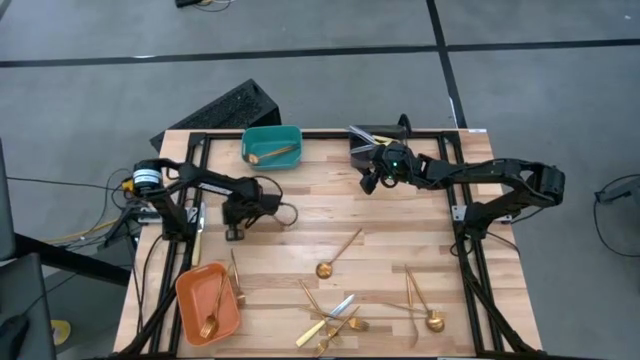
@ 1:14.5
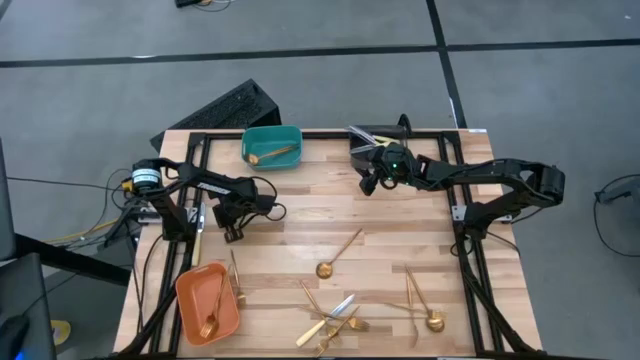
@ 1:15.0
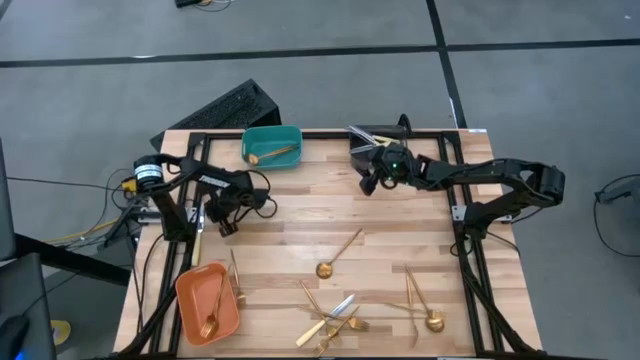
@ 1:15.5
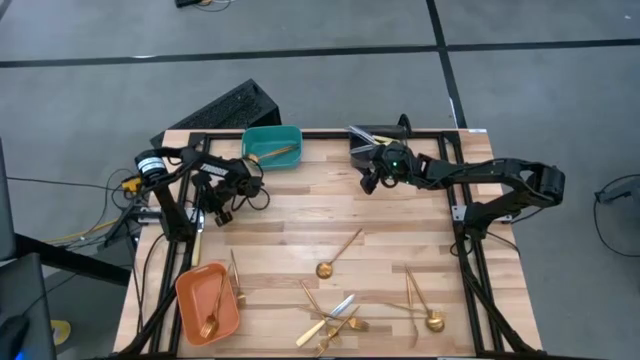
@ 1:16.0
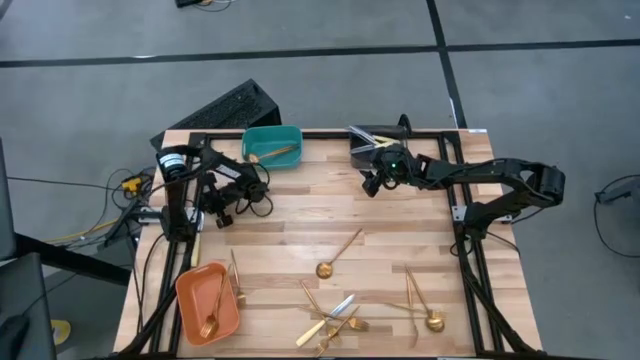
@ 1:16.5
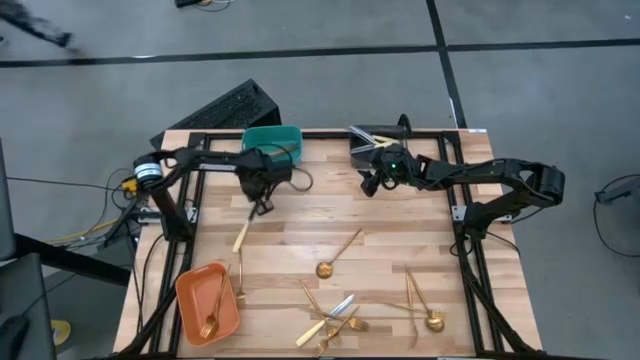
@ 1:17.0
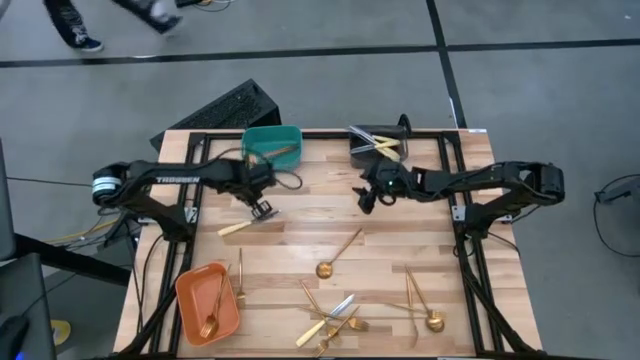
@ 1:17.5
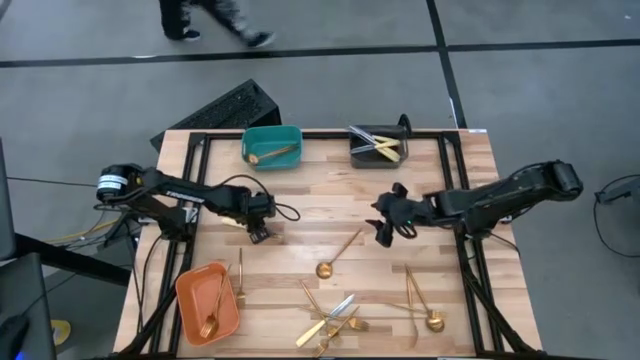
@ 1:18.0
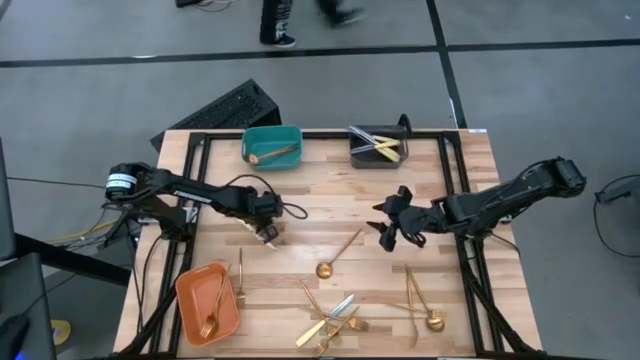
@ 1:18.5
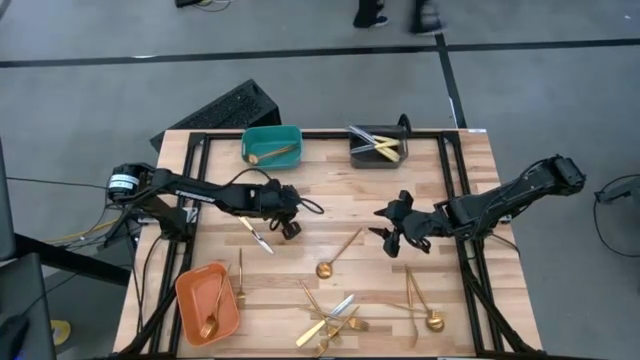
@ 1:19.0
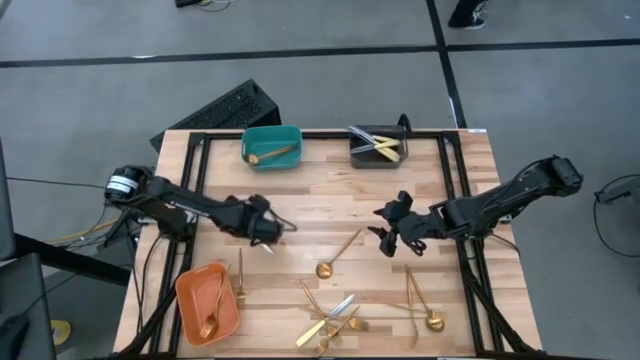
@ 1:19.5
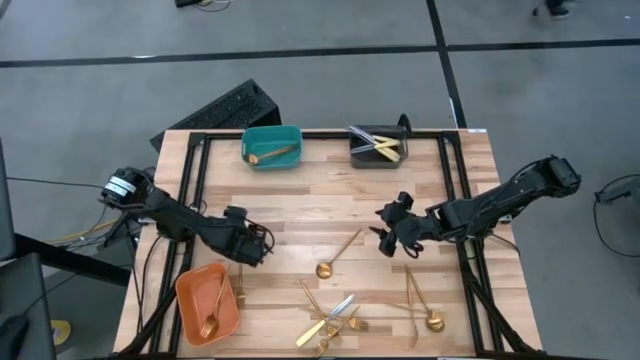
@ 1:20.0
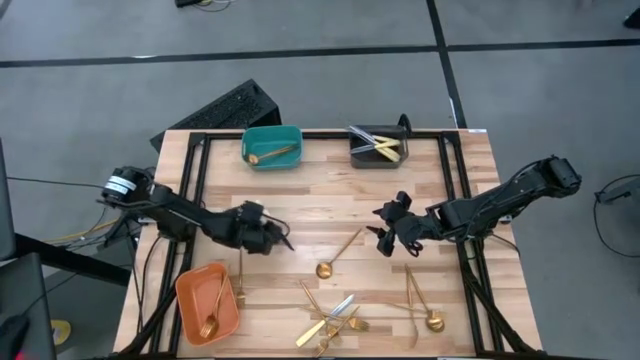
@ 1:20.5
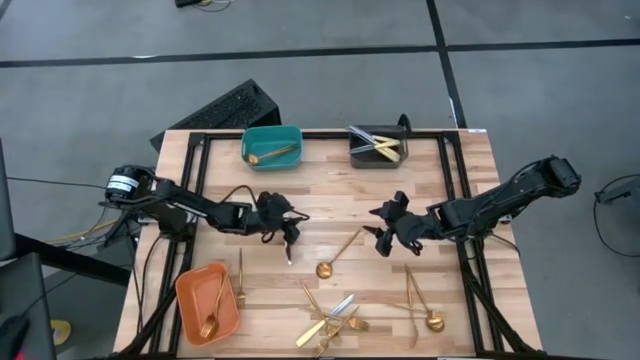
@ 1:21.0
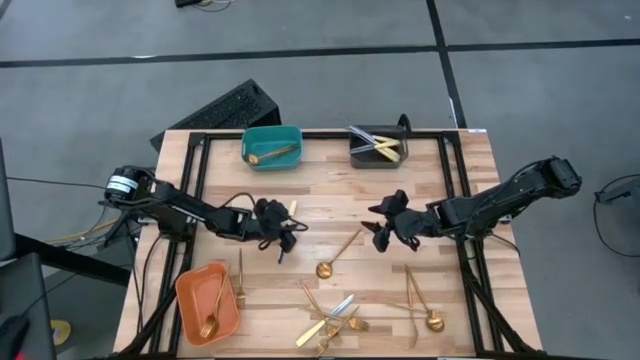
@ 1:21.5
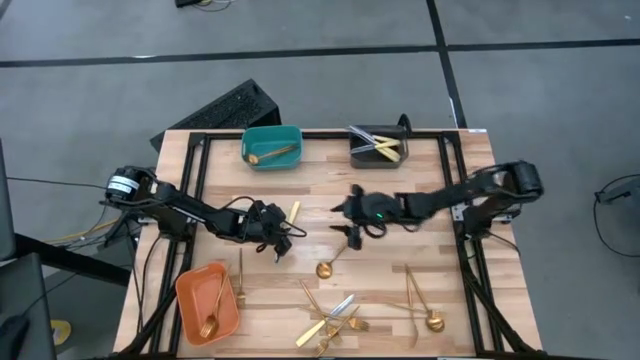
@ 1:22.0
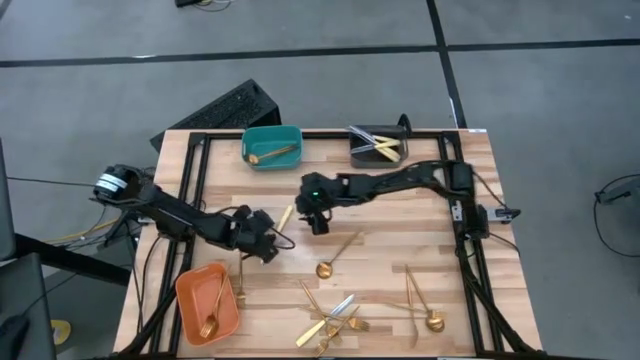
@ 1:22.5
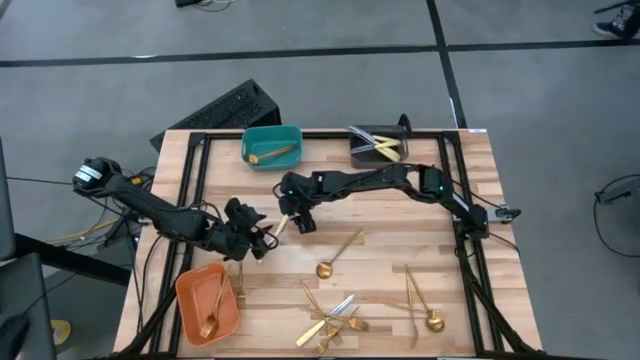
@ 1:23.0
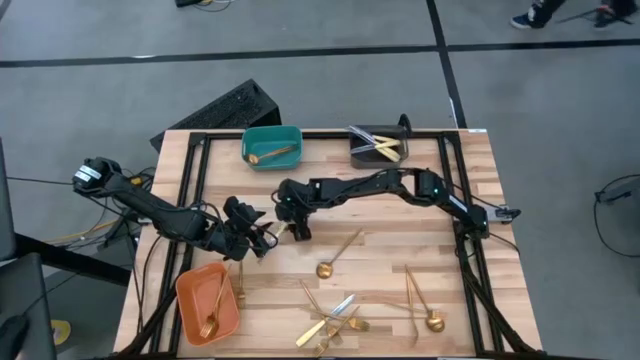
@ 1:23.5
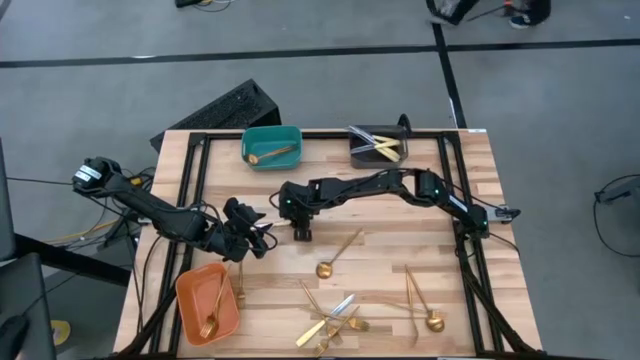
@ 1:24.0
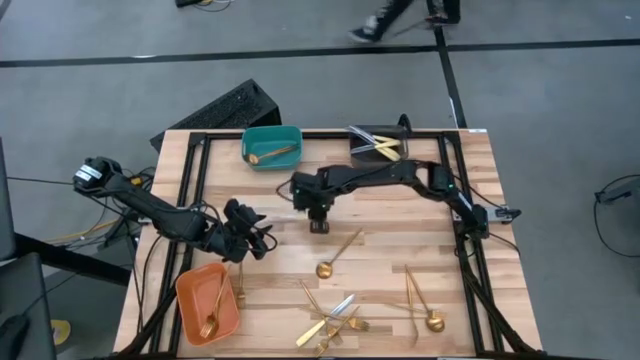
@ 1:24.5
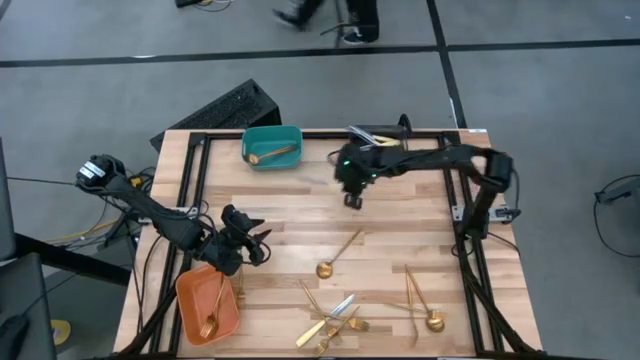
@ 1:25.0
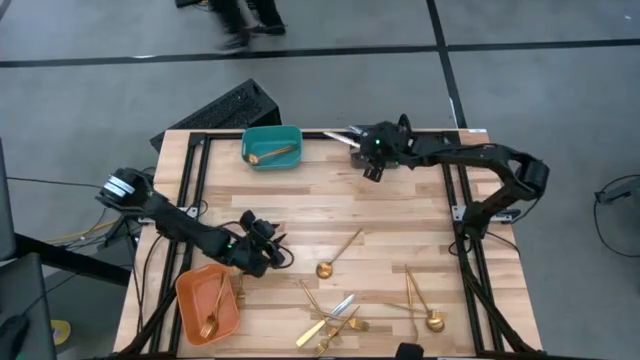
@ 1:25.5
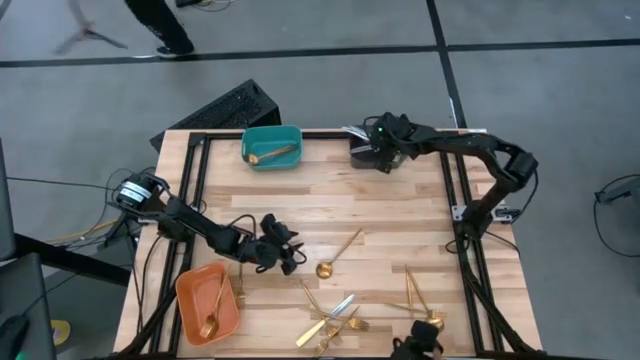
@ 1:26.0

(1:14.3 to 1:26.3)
Task: Sort silverware by color (type)
Put the yellow knife into the black bin

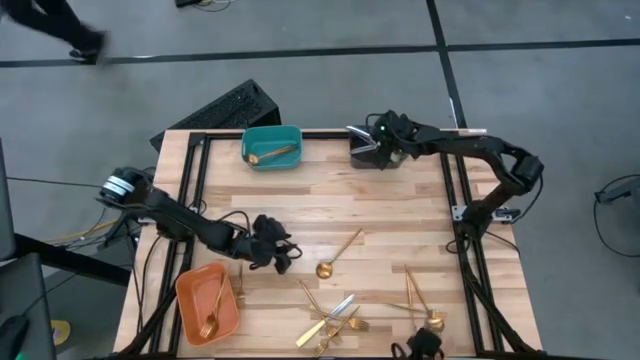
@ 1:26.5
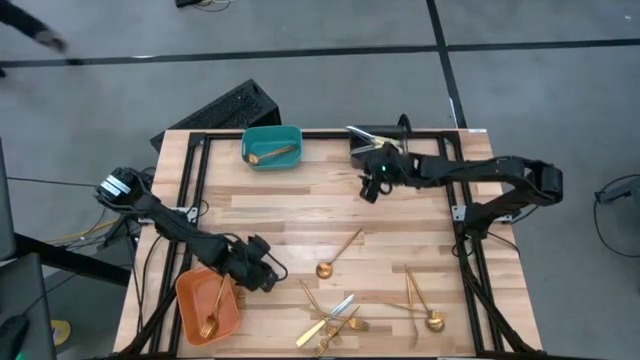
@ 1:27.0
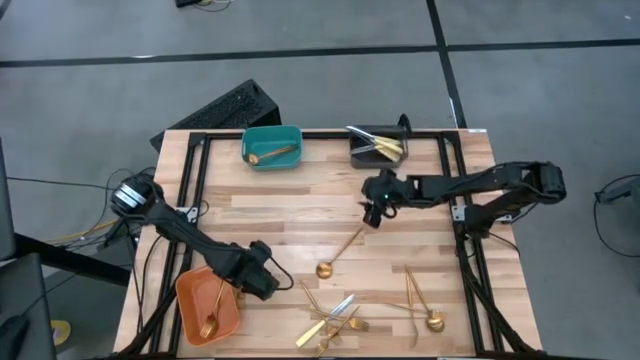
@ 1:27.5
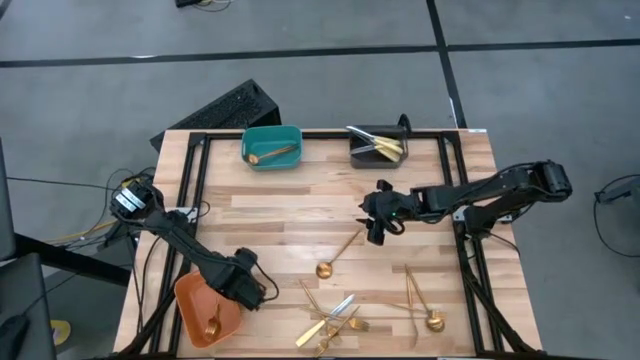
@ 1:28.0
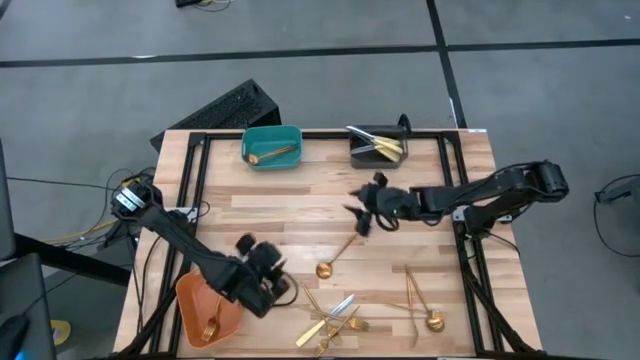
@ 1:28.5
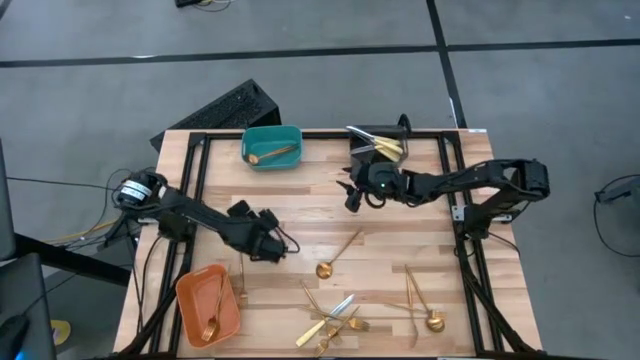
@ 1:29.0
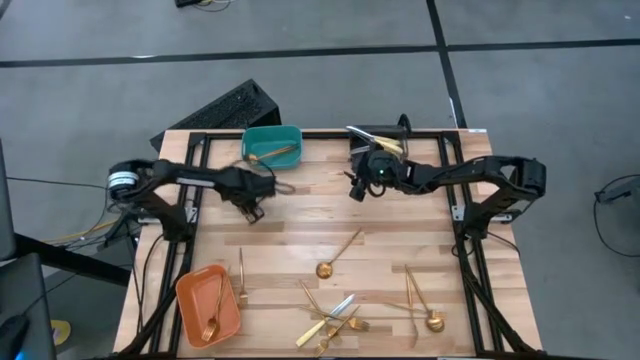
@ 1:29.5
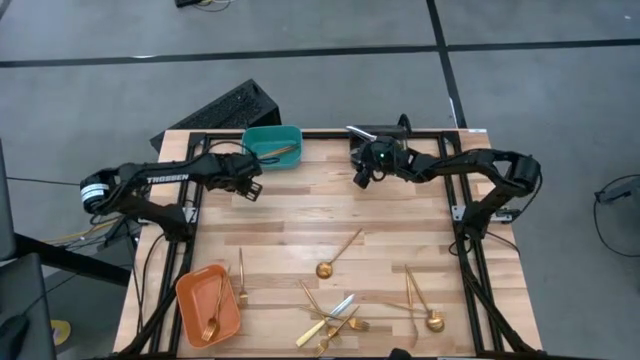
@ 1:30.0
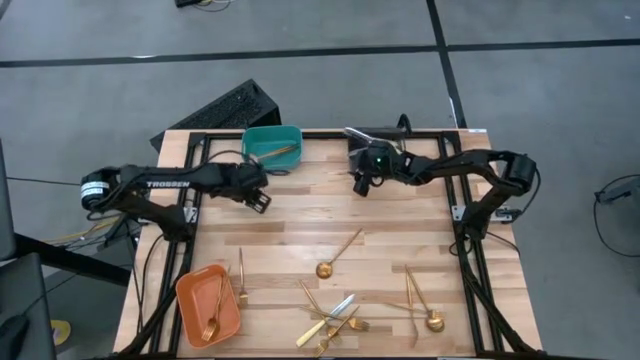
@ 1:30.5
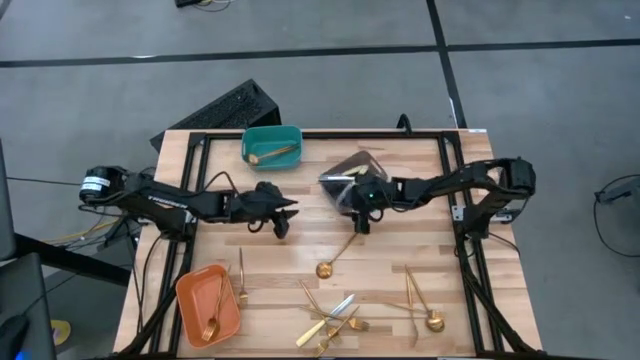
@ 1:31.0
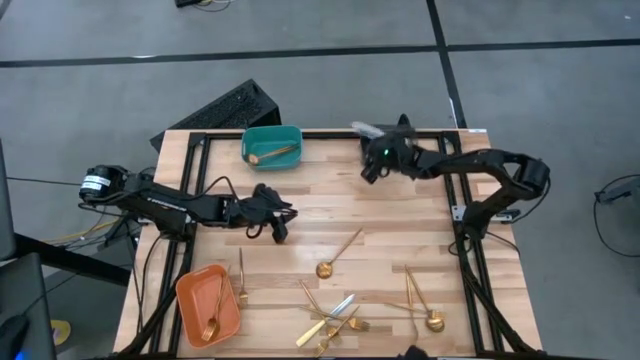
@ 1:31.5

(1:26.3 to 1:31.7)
Adjust the black bin

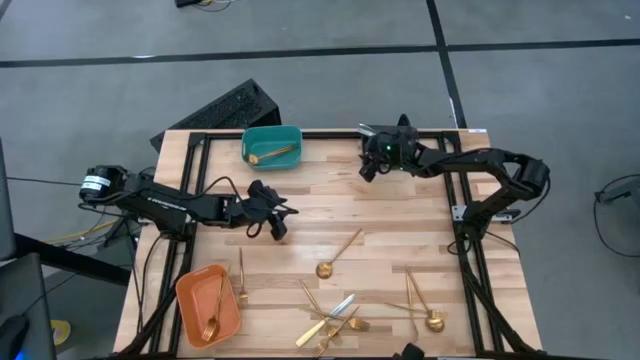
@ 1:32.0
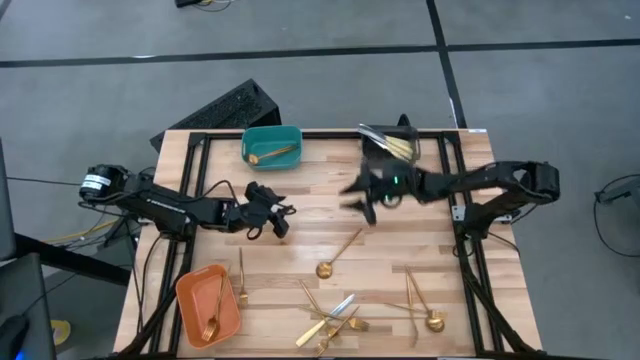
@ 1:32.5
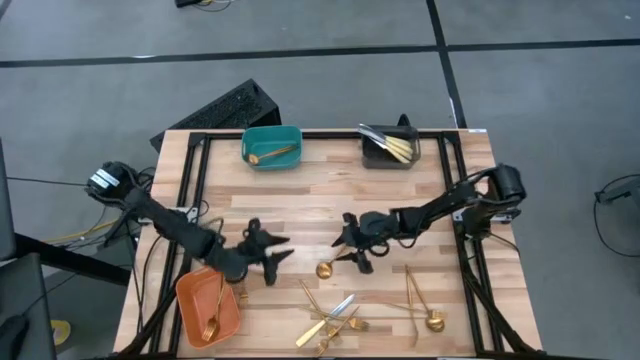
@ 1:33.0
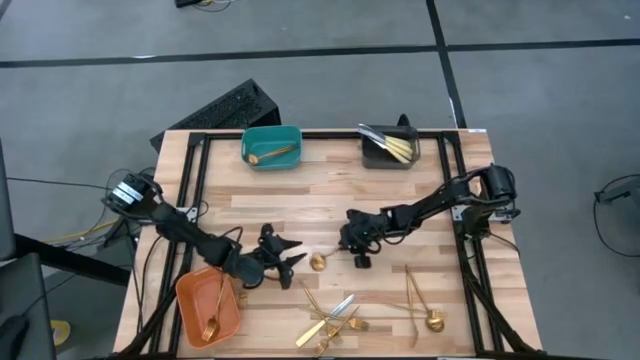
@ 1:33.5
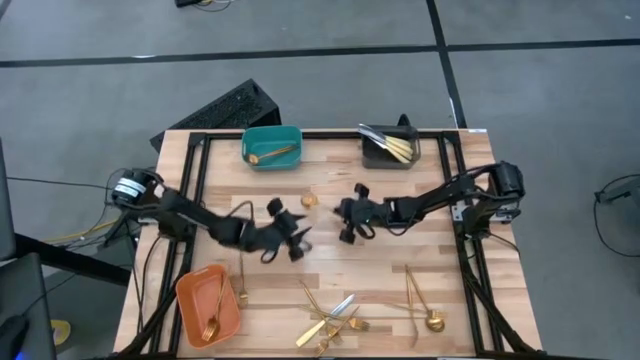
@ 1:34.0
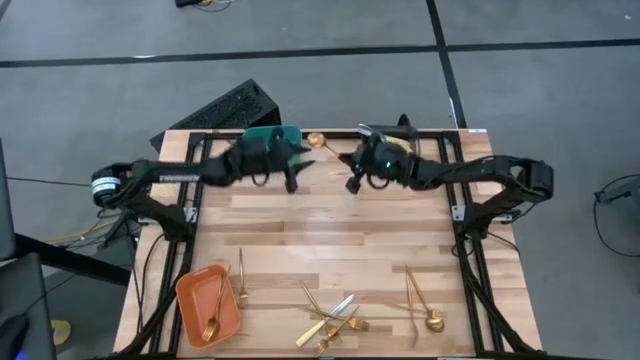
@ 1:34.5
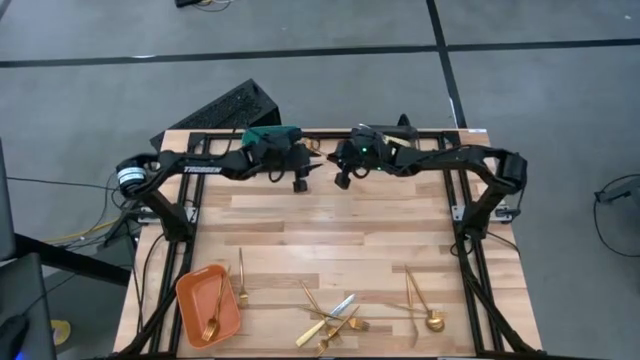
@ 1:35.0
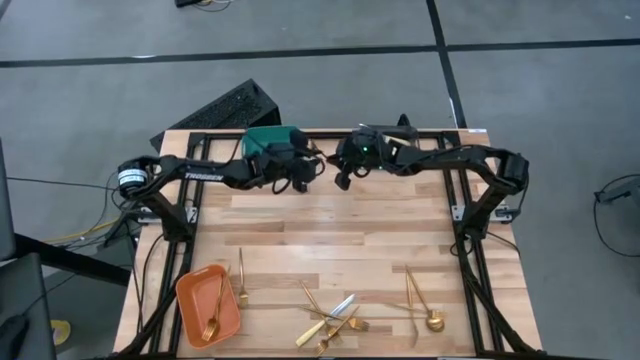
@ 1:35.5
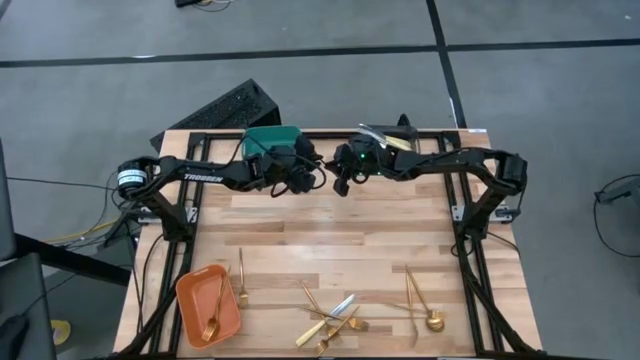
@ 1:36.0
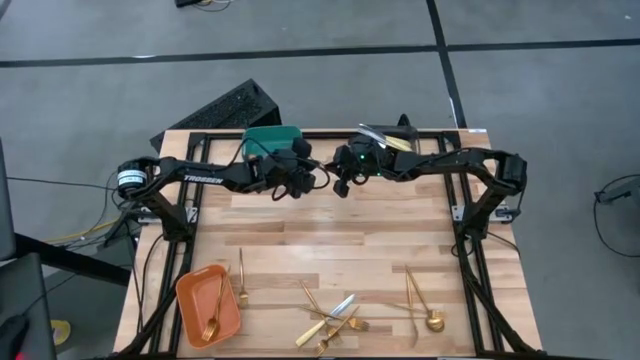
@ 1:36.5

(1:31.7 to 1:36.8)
Put the gold spoon into the green bin
